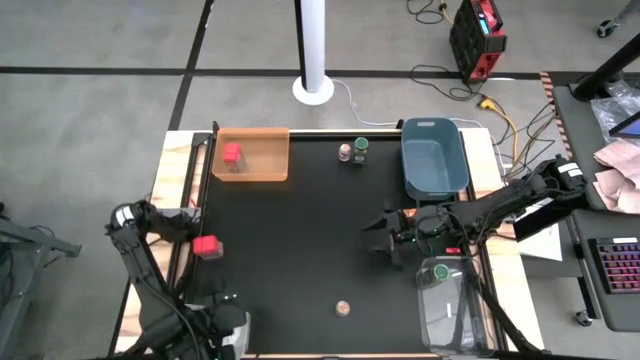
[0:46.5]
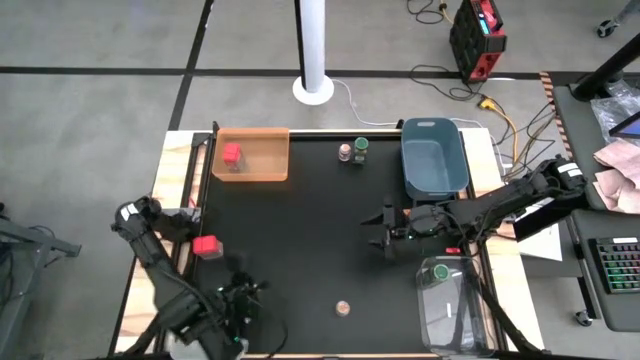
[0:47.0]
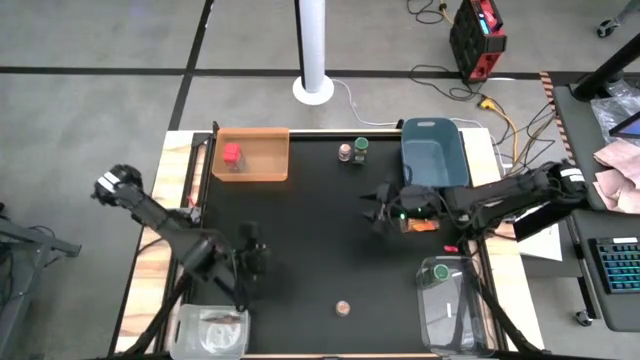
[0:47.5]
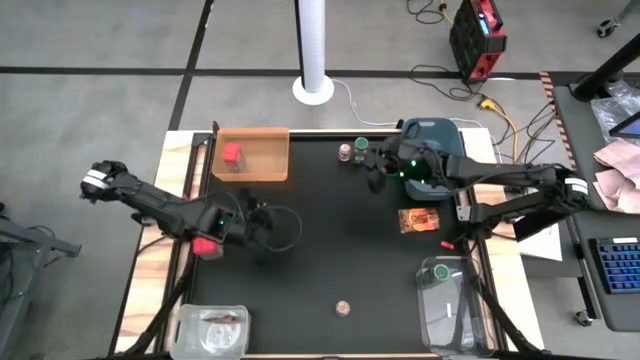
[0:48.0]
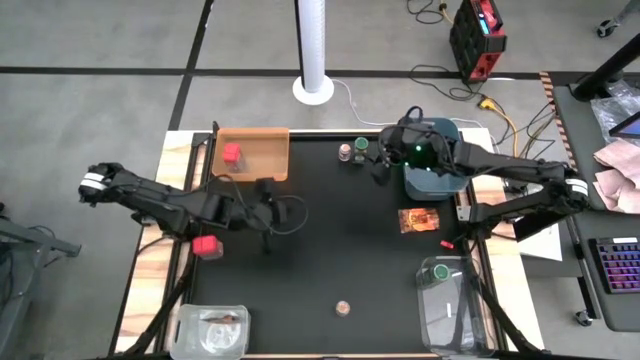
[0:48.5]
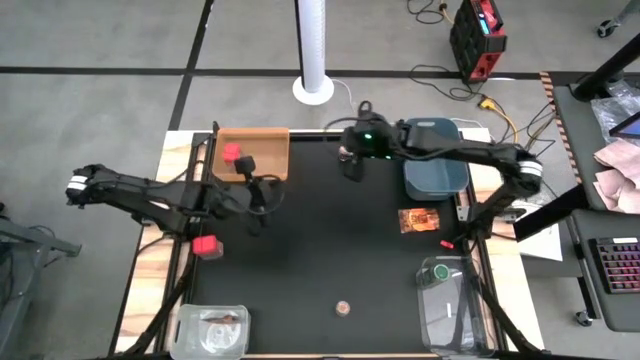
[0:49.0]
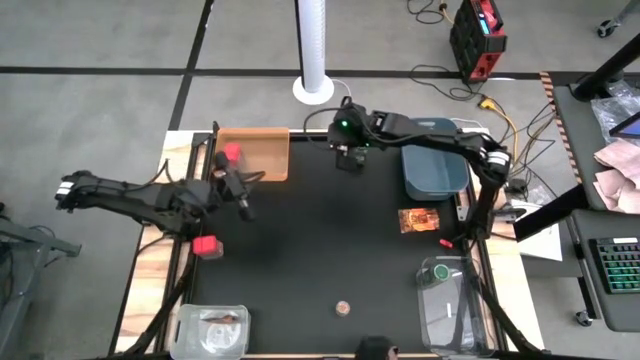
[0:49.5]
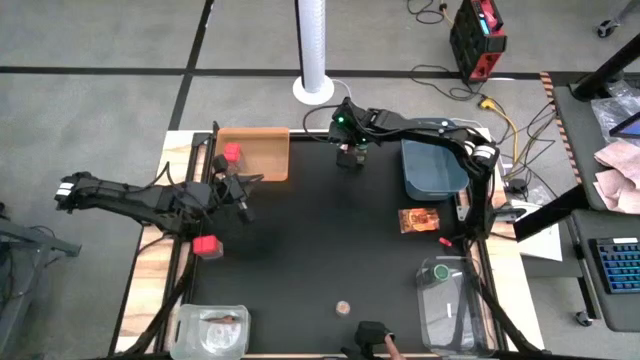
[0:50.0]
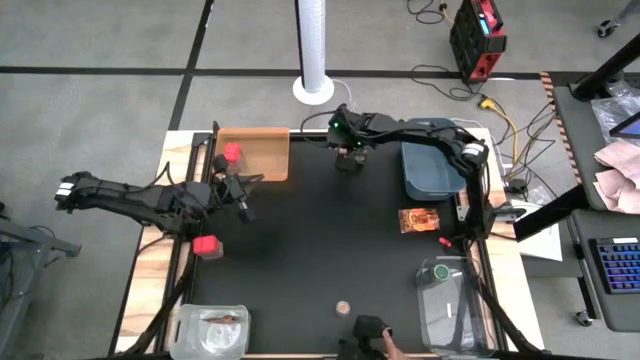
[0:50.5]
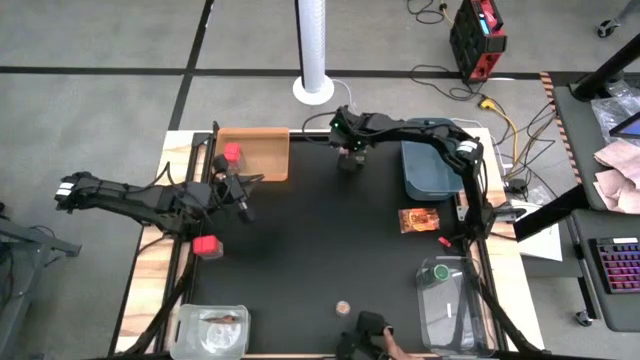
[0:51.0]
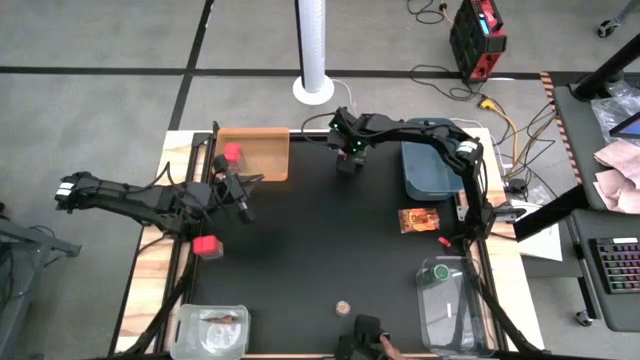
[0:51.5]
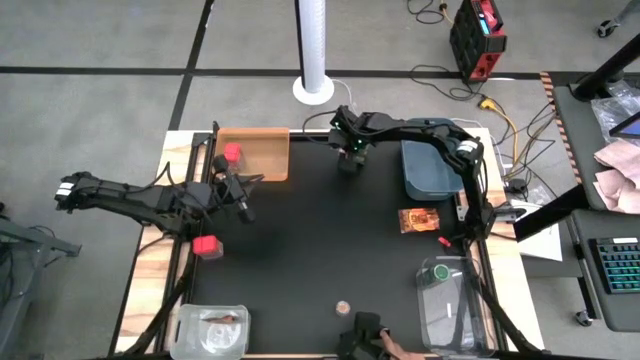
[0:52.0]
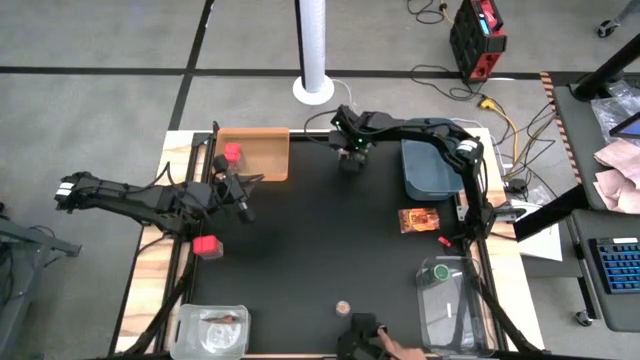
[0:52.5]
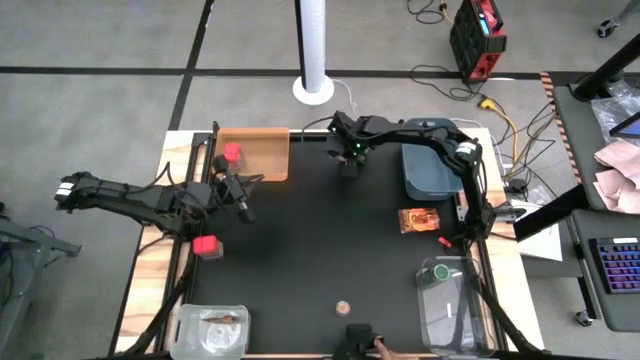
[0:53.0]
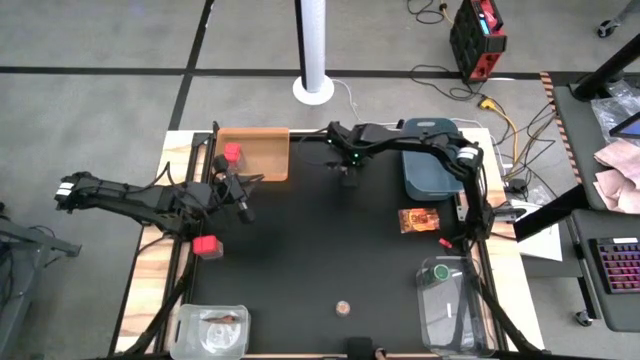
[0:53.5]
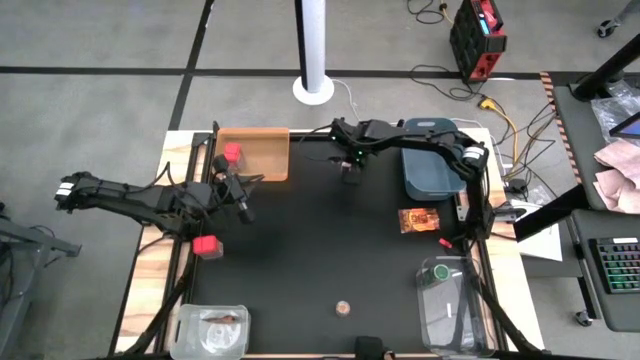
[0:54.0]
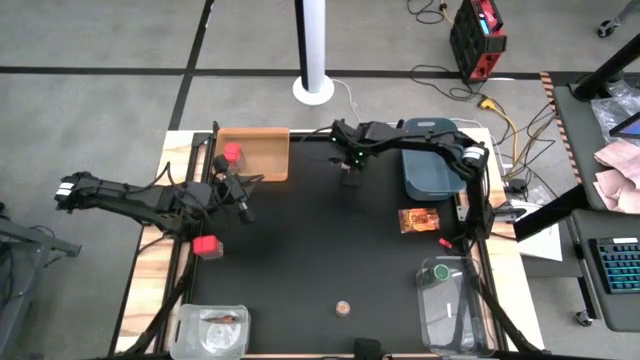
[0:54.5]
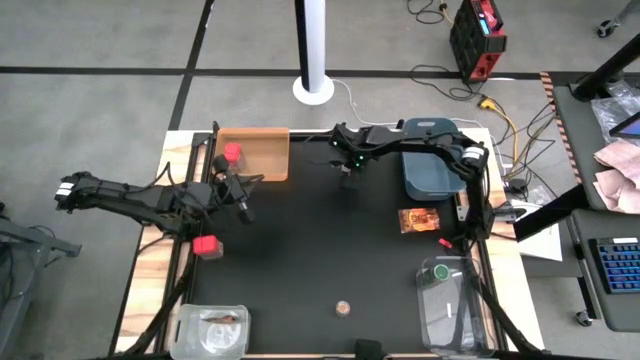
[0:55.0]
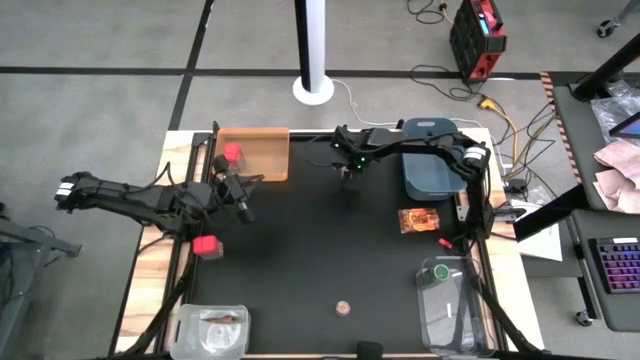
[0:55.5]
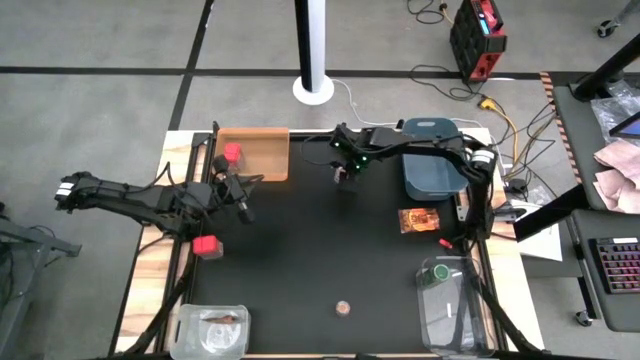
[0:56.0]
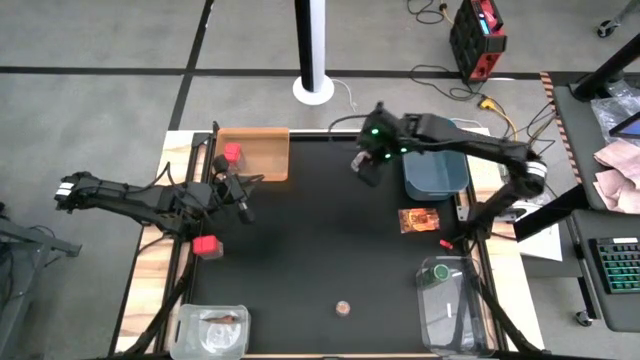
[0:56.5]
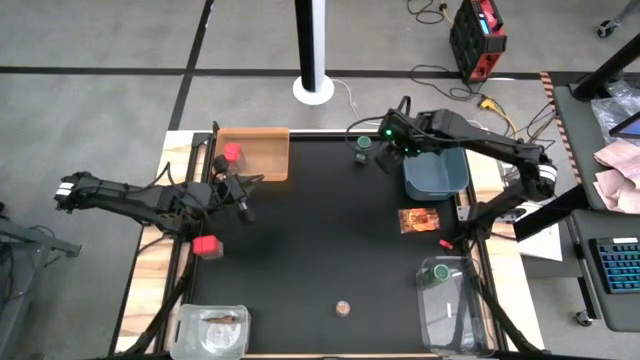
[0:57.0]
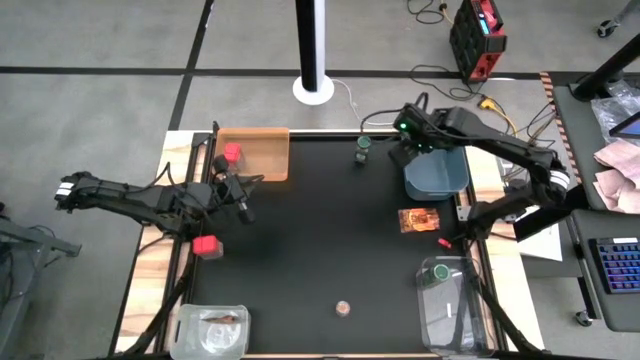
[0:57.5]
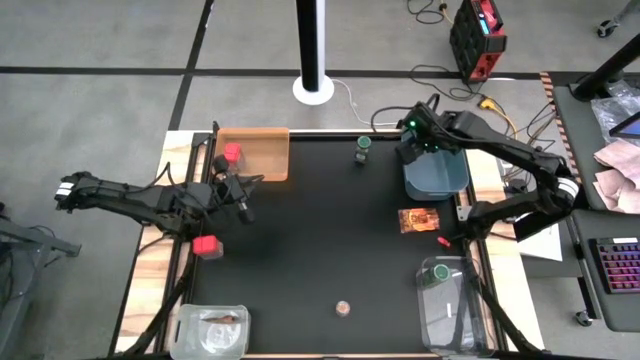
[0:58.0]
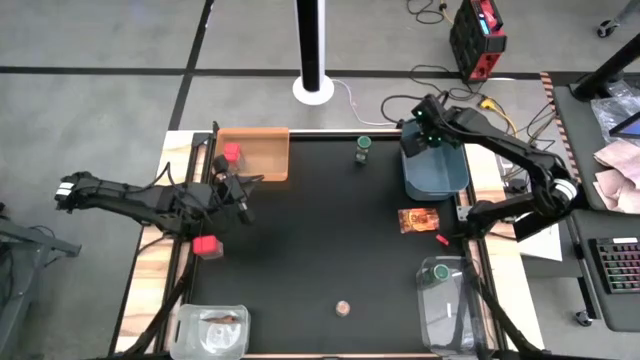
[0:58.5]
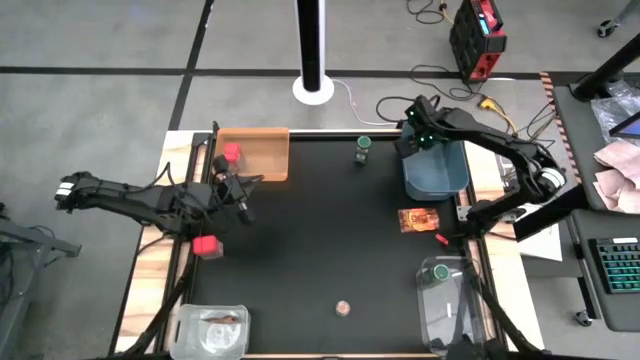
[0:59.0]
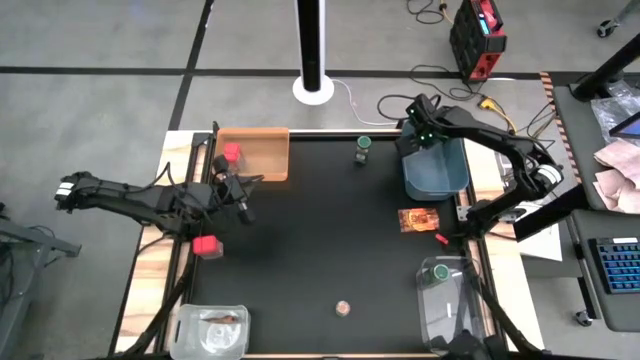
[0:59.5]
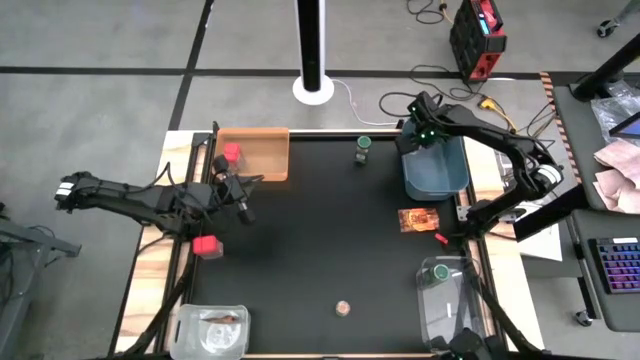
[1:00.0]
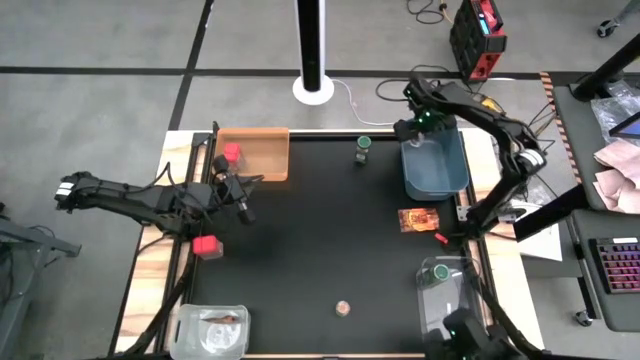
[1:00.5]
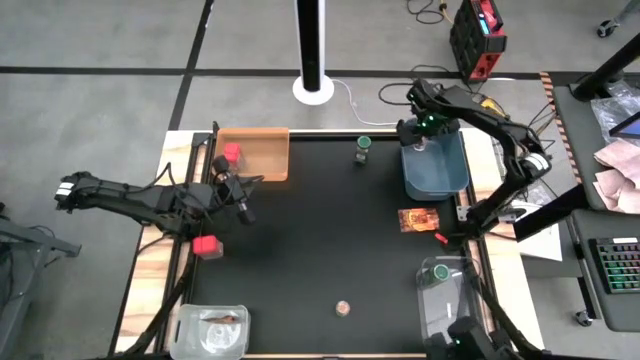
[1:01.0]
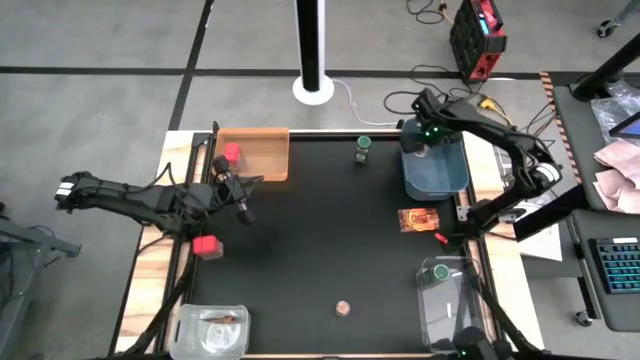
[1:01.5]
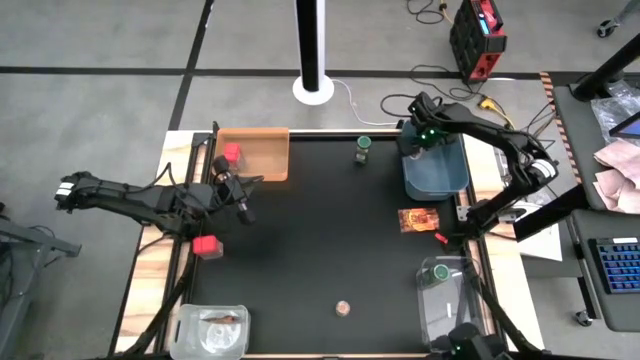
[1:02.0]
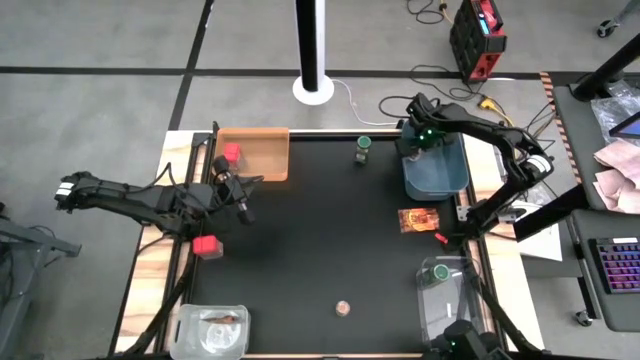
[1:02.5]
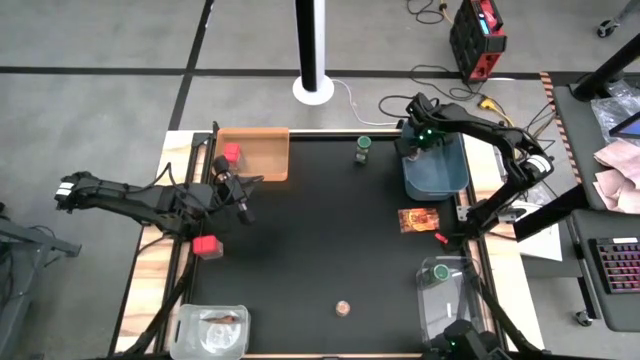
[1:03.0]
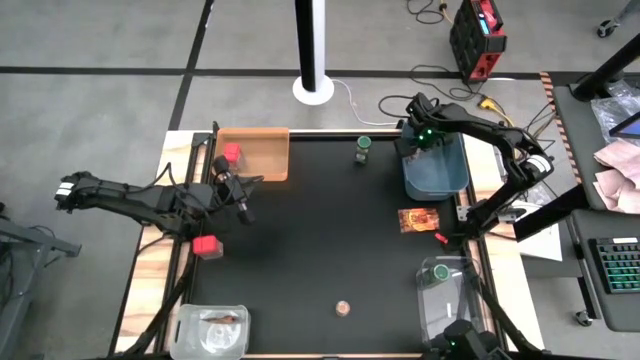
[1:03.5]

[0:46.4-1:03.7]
Task: Sort spices by type
Put the top brown seasoning bottle into the blue bin

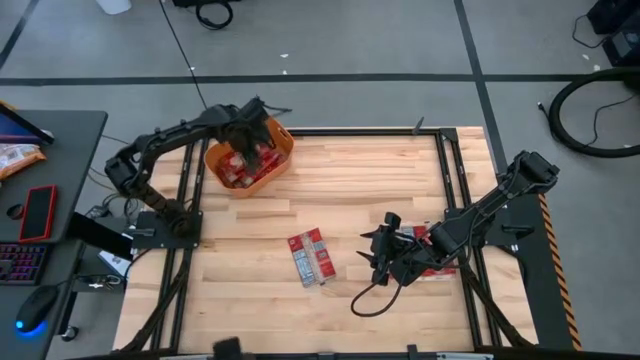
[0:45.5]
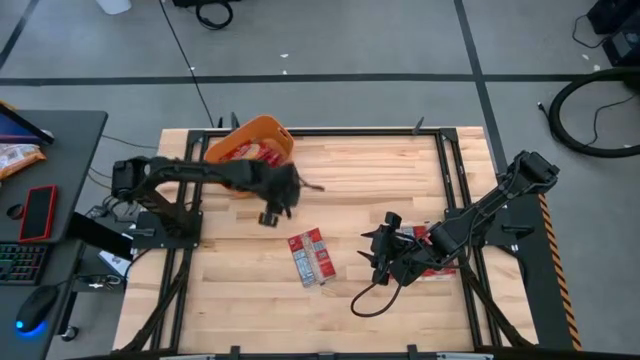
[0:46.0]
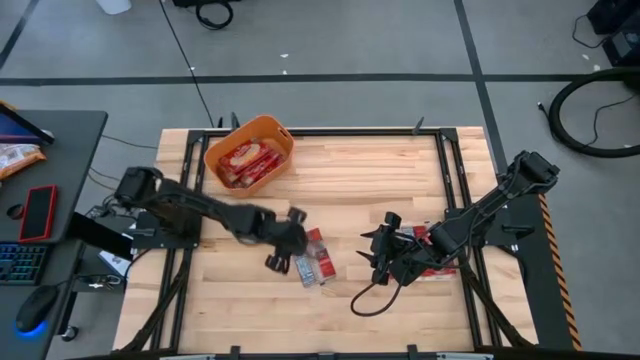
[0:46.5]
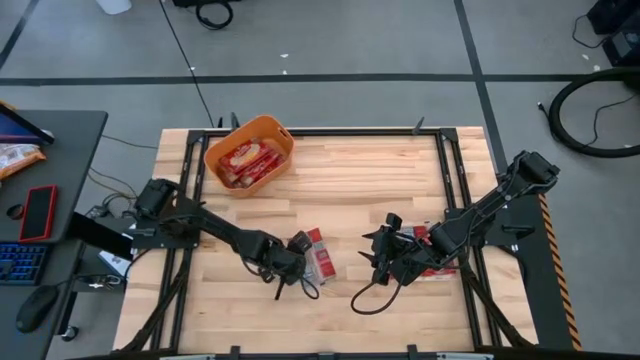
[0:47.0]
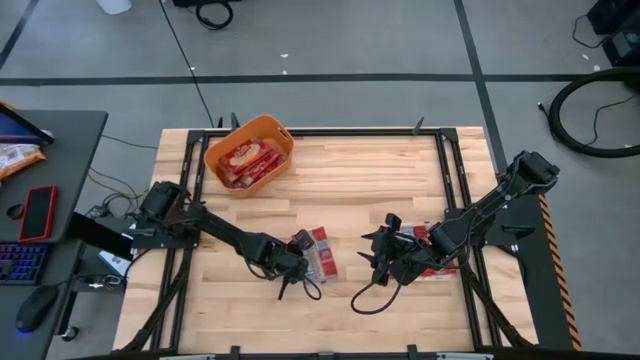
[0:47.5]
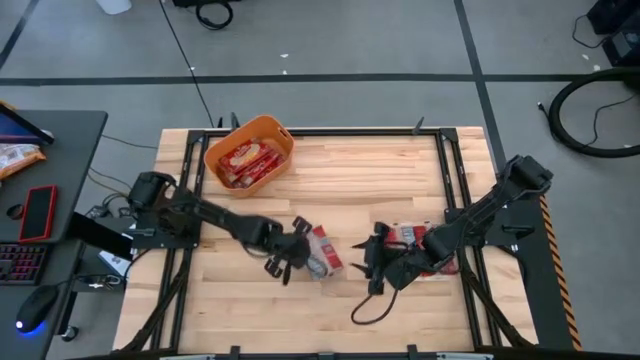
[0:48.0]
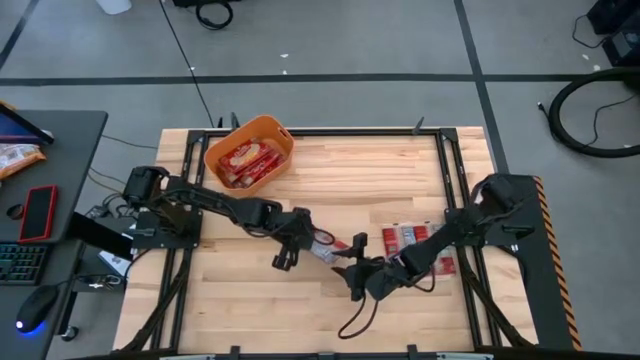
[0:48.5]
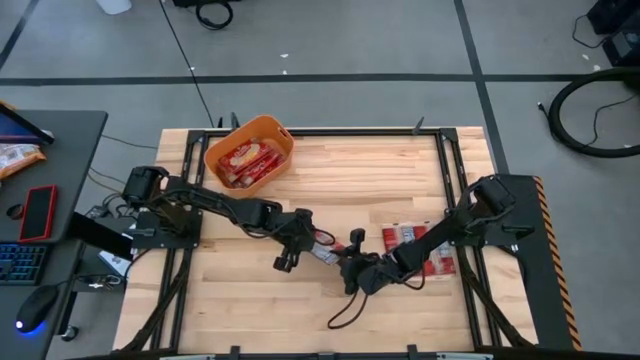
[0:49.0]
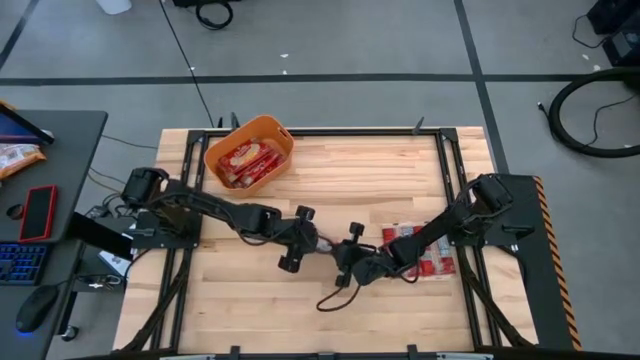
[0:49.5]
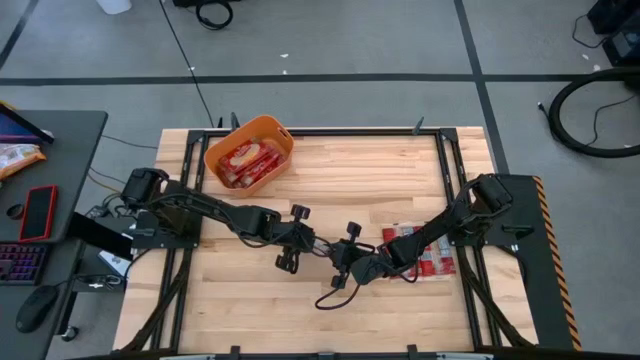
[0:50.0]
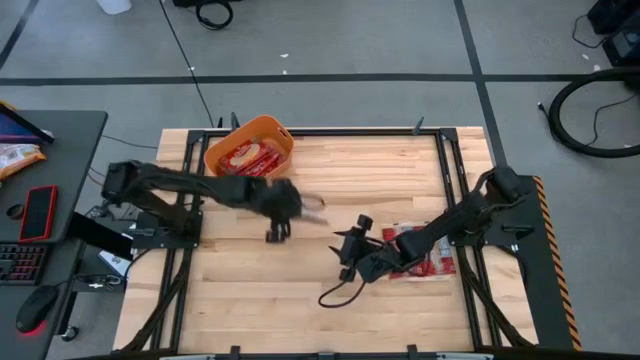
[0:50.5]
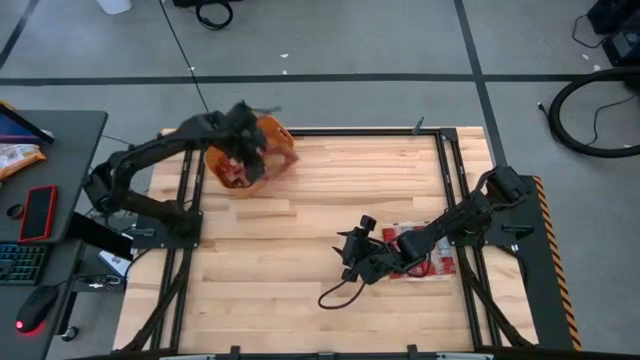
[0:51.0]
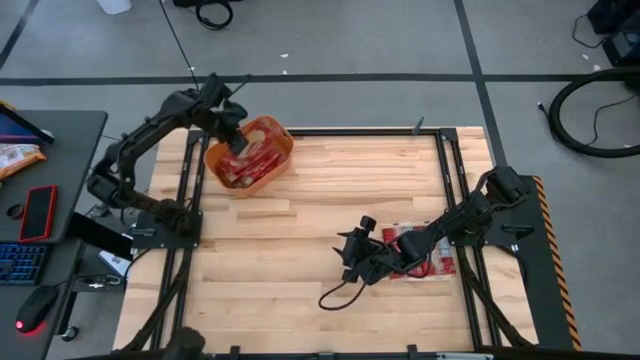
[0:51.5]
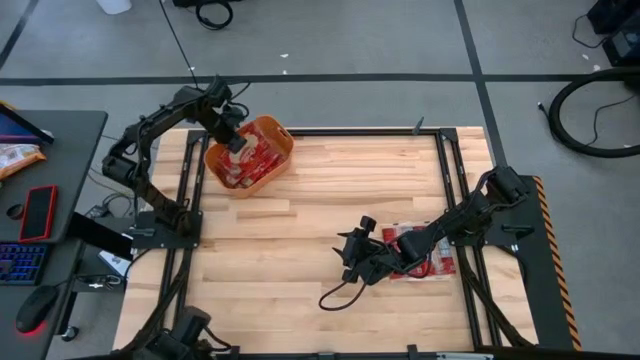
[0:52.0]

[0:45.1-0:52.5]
Task: Sort popcorn bags into baskets
Put the red popcorn bag into the orange container
